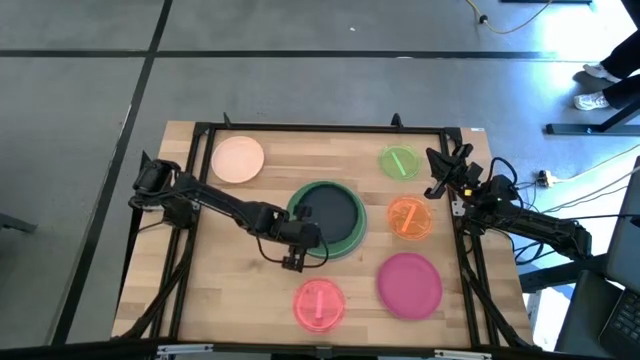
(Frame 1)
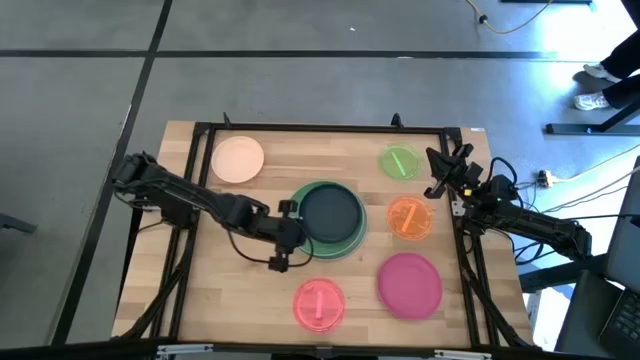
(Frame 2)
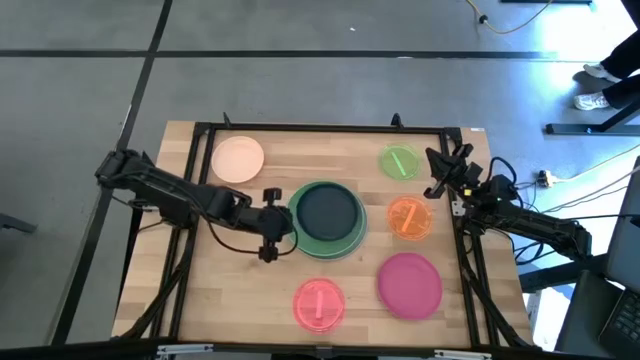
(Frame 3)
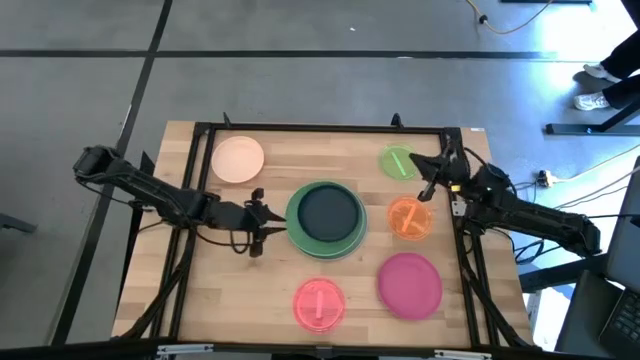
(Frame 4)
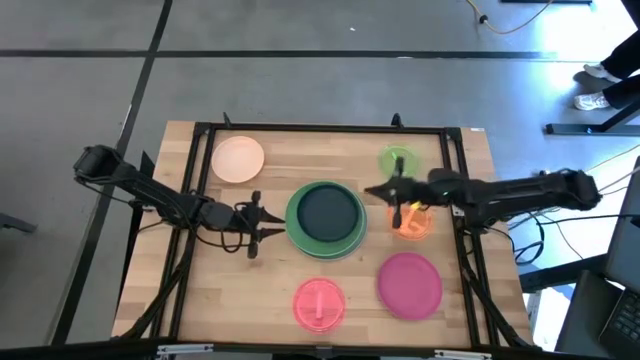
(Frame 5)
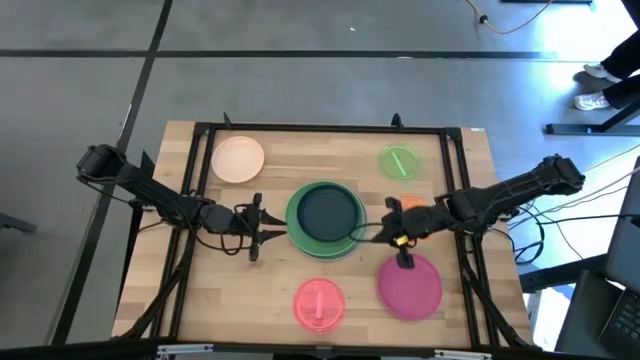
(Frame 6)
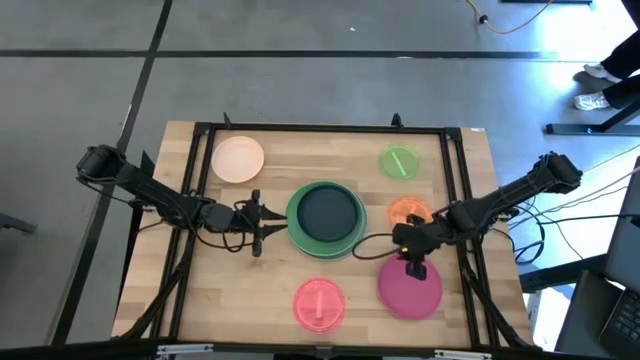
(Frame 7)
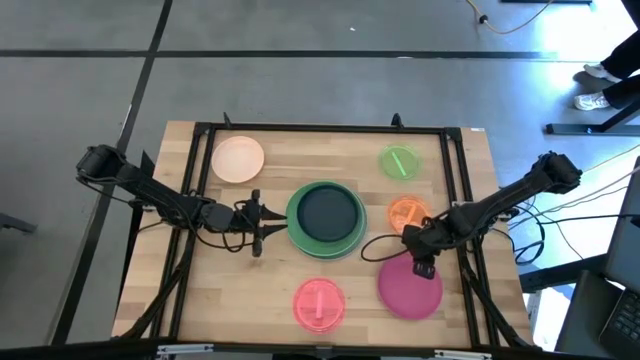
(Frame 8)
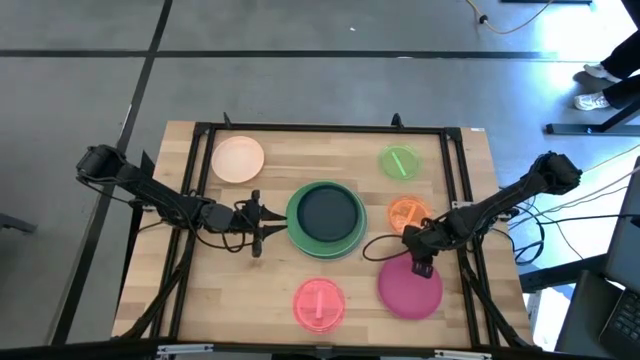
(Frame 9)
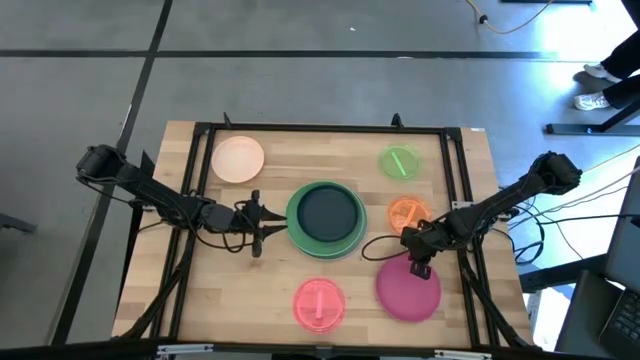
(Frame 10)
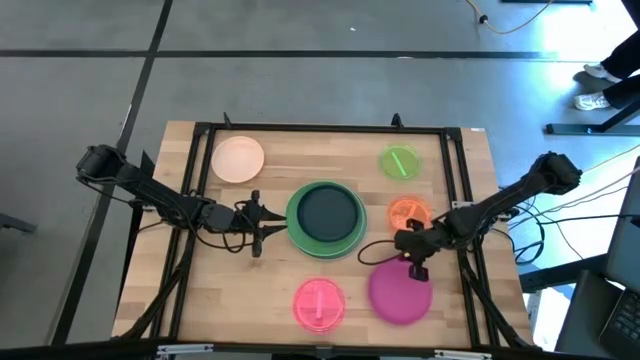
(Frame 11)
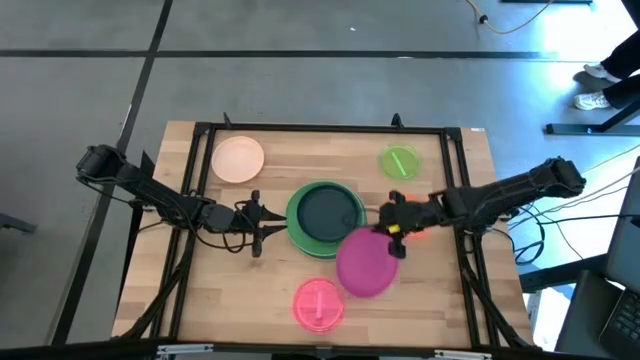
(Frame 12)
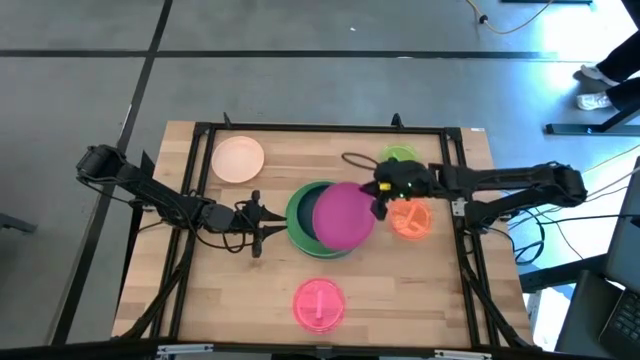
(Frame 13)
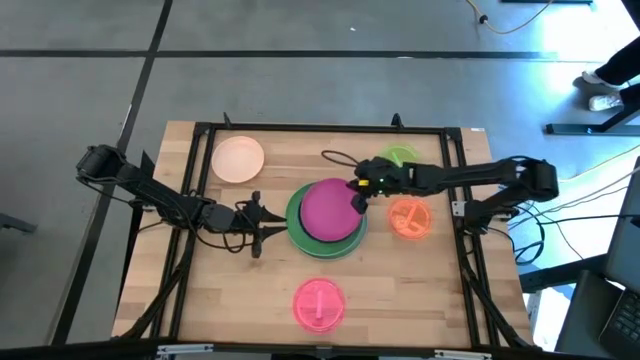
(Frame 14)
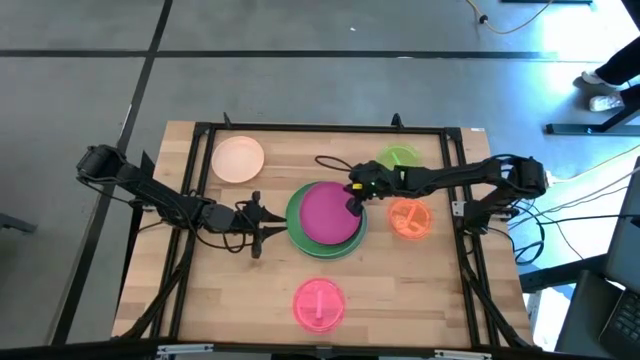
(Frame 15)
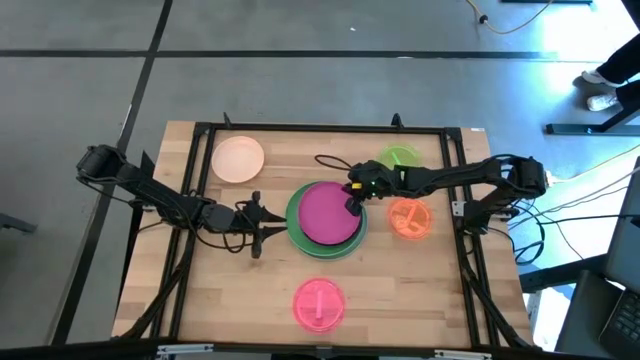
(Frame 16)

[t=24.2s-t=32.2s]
Task: Stack plastic plates
Stack the pink plate on top of the black plate

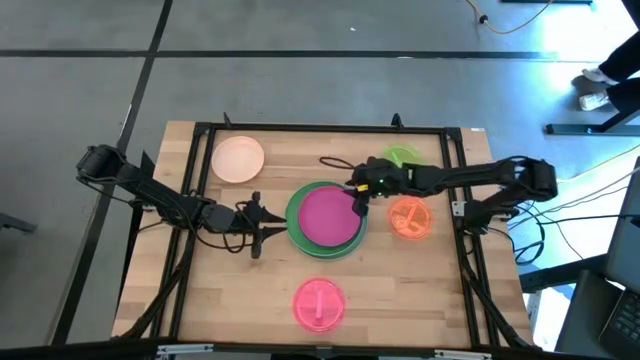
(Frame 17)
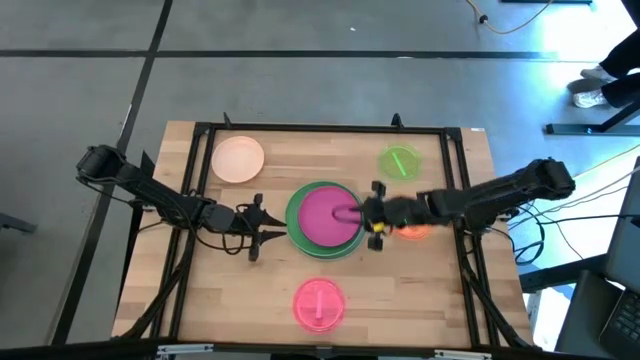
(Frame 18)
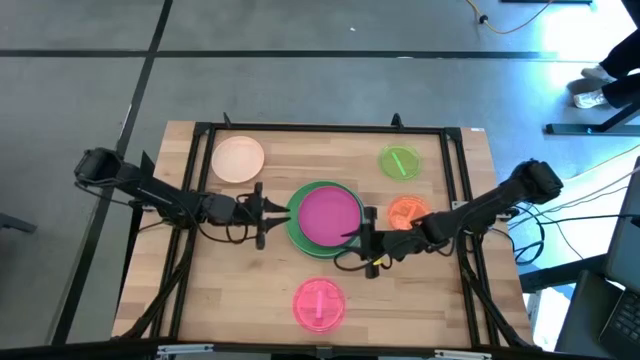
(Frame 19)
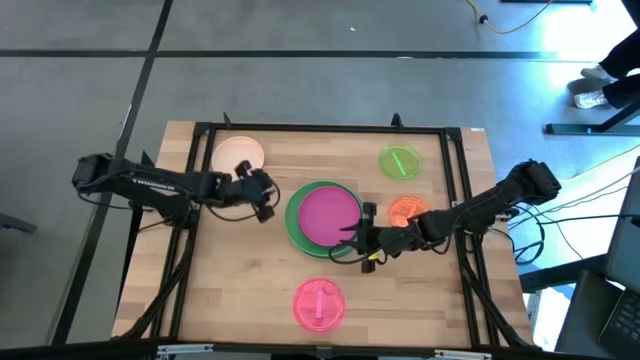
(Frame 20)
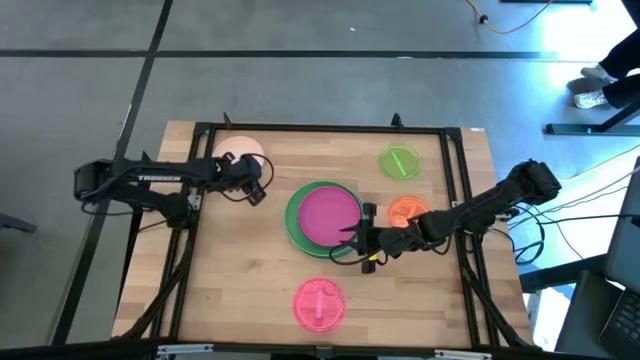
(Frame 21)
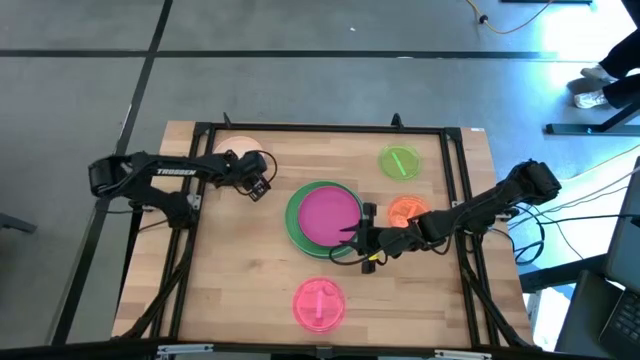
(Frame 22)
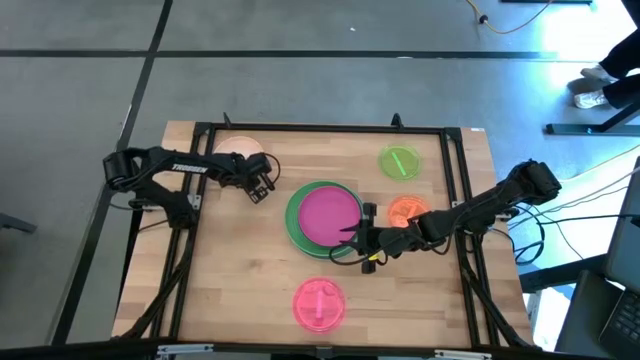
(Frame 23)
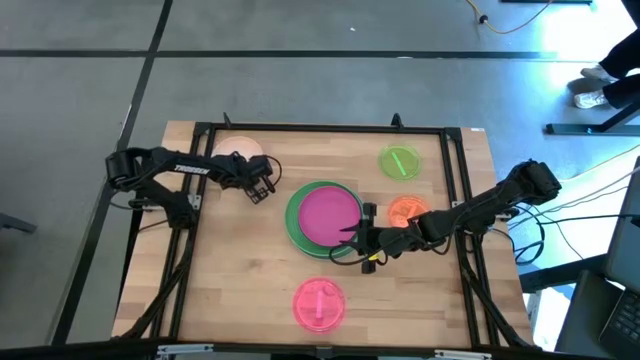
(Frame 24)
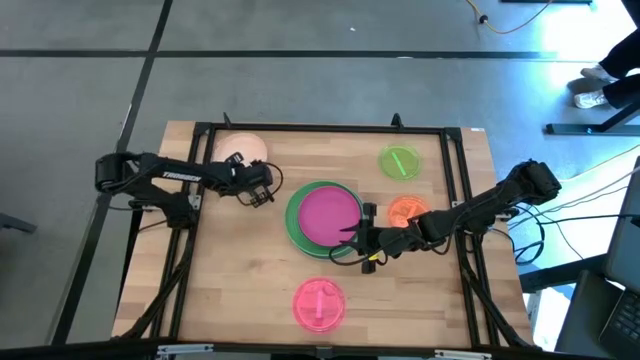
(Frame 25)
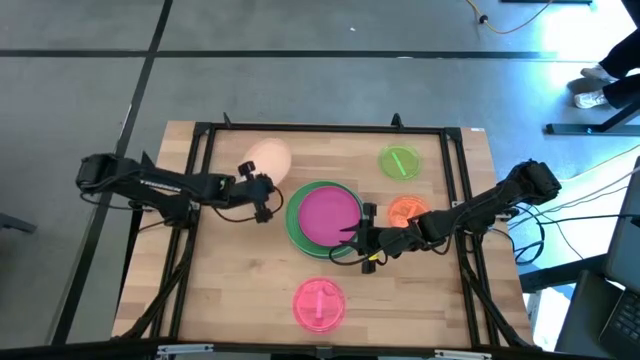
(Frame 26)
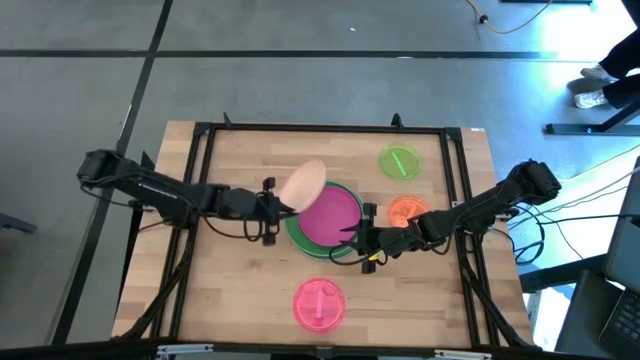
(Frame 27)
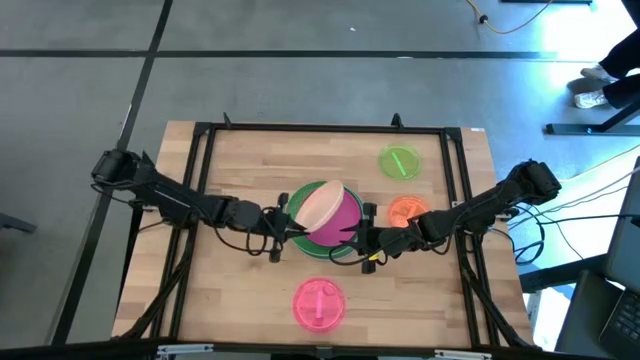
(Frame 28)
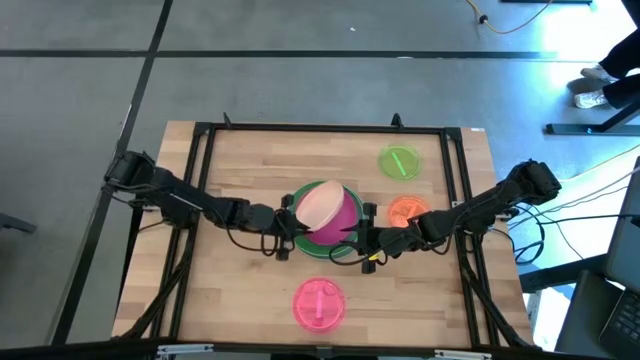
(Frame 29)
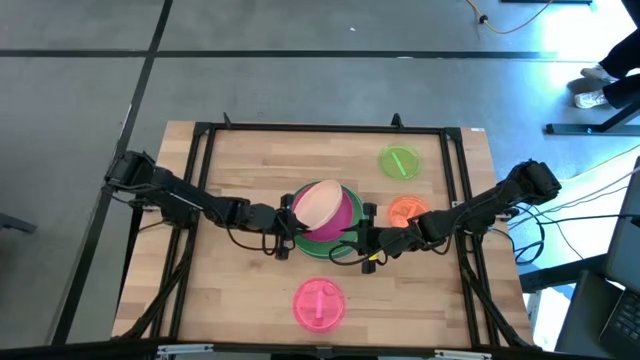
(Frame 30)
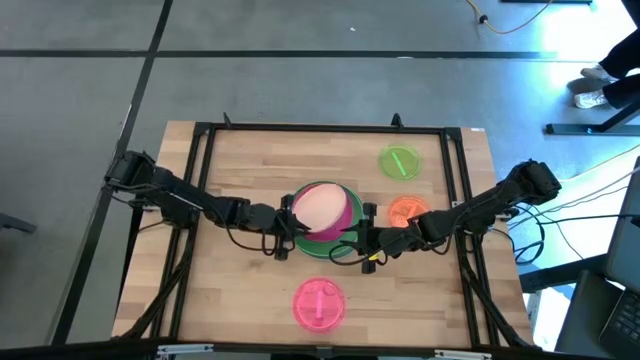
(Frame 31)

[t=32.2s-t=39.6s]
Stack the light orange plate on top of the pink plate

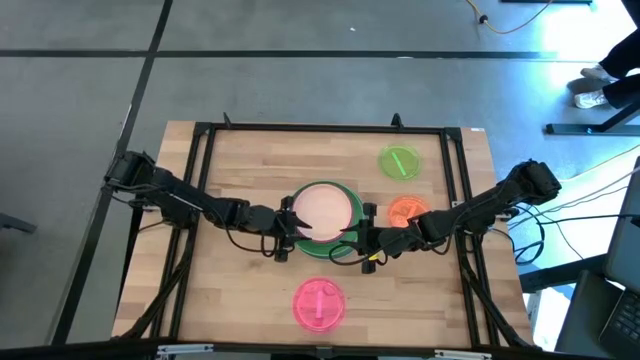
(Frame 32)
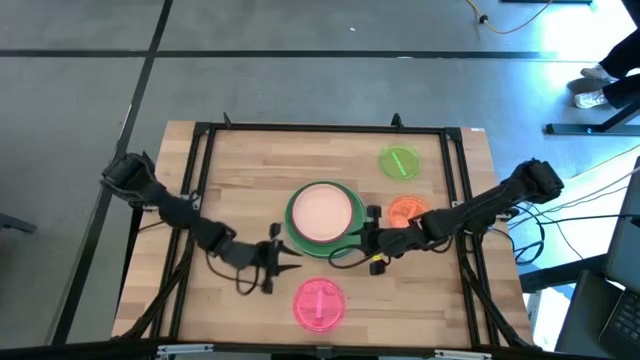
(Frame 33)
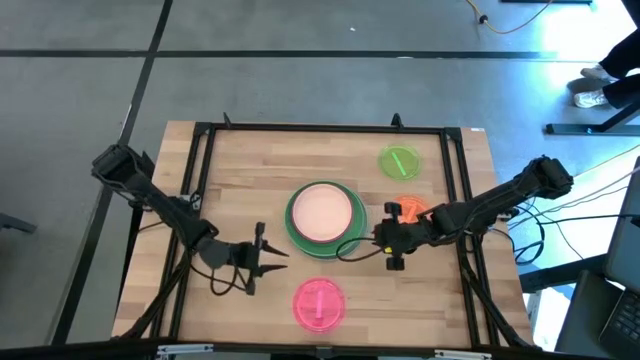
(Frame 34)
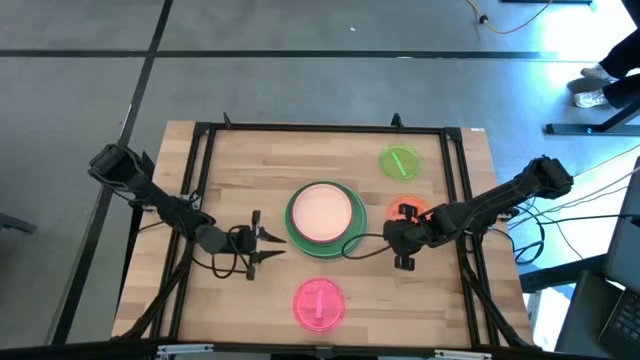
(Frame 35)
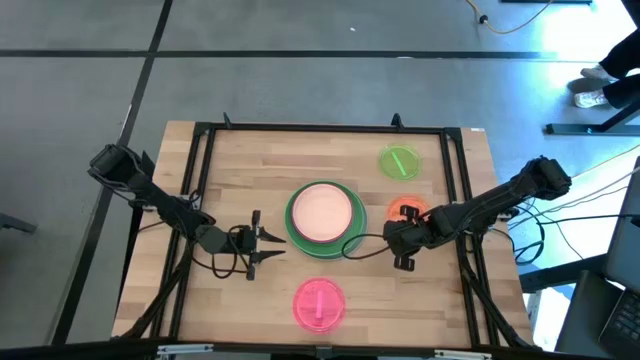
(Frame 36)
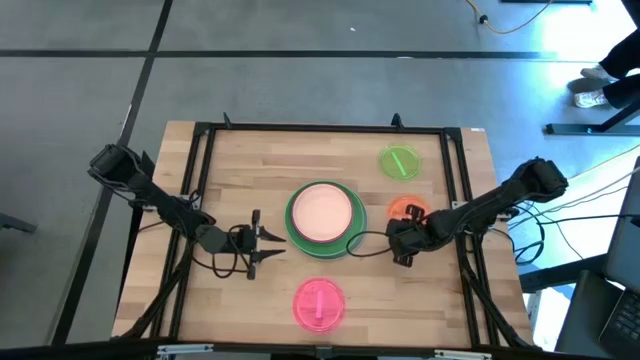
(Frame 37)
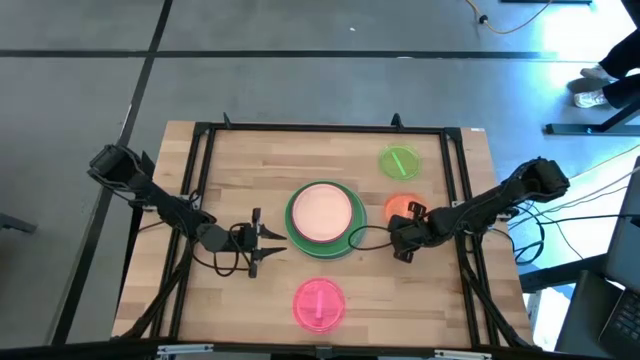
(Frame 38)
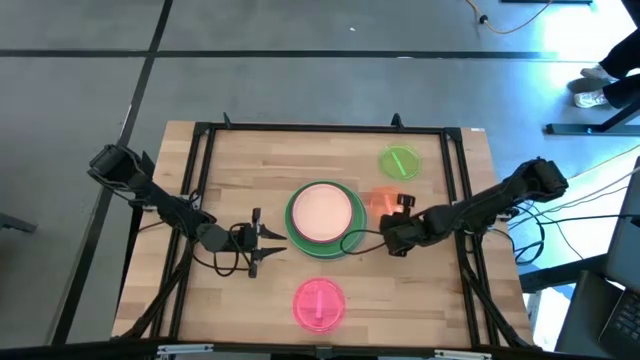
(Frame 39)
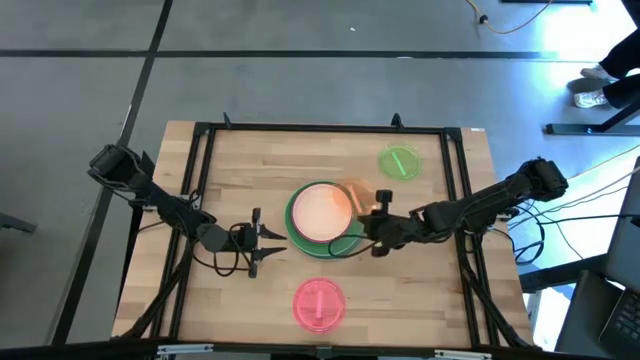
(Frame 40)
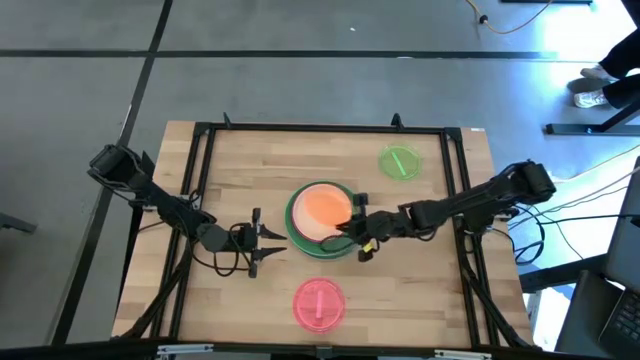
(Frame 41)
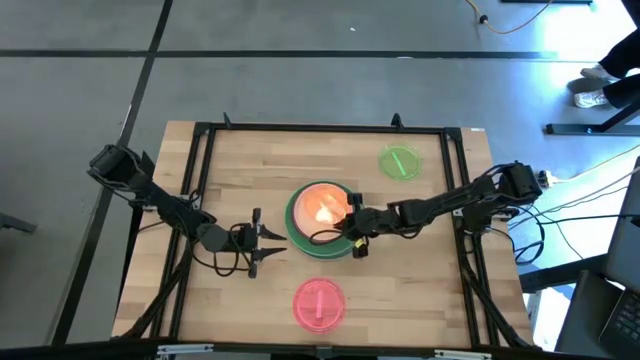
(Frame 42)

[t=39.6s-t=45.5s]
Stack the orange plate on top of the light orange plate

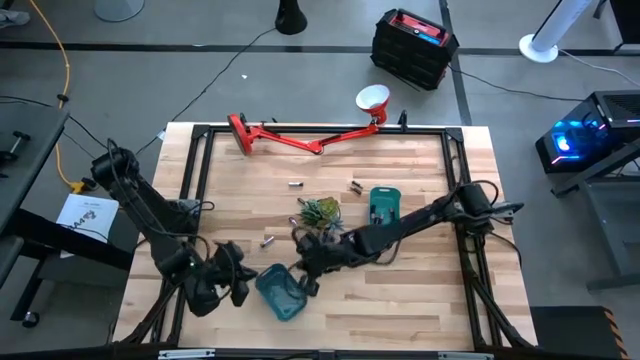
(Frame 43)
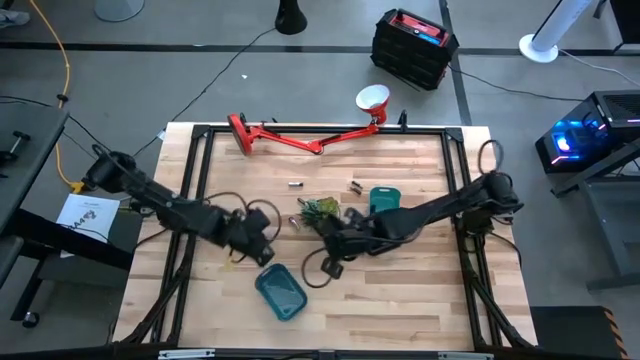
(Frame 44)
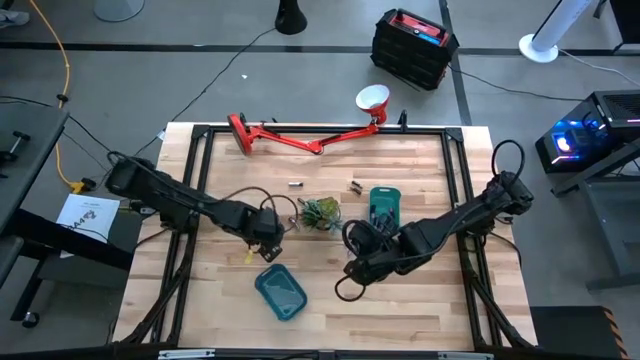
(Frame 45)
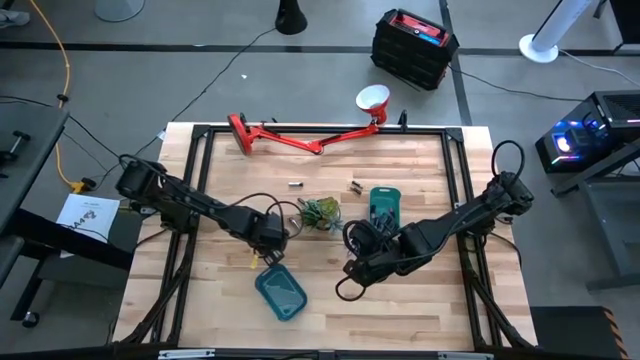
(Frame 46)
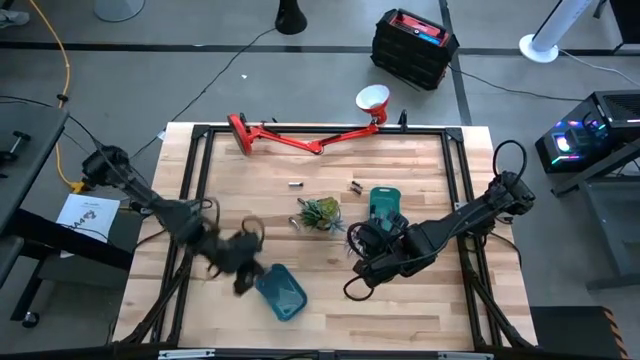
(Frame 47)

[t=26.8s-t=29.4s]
Task: Sort batteries
Put the silver battery into the blue bin
